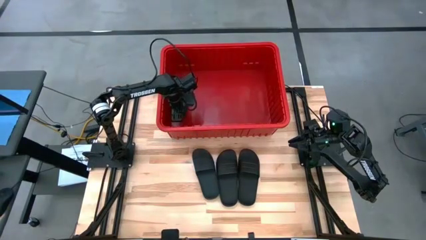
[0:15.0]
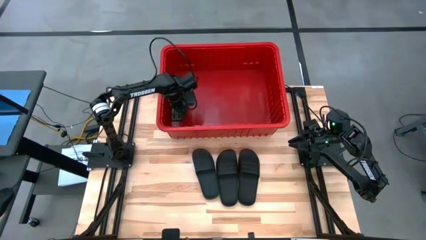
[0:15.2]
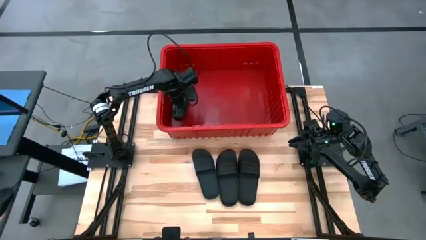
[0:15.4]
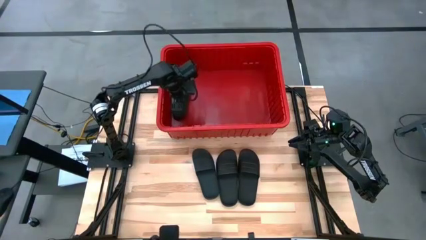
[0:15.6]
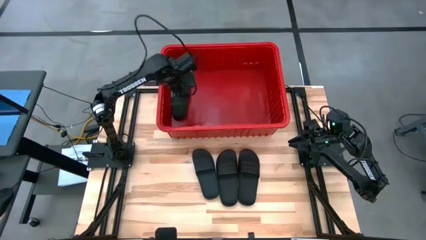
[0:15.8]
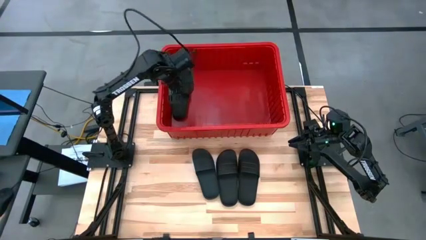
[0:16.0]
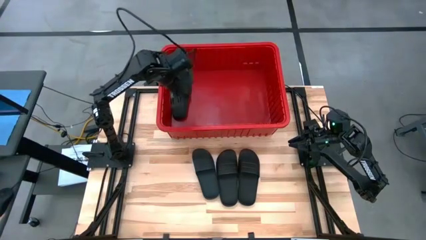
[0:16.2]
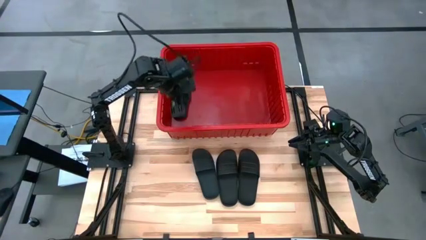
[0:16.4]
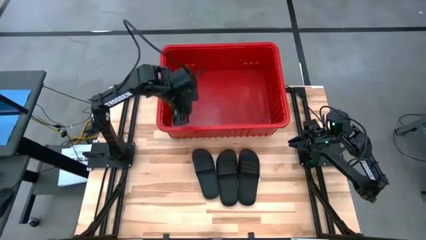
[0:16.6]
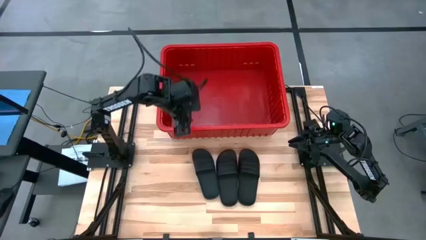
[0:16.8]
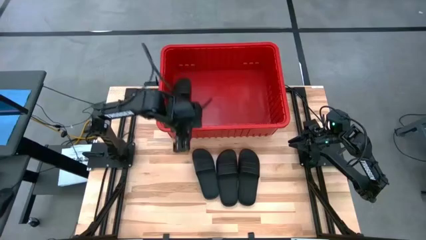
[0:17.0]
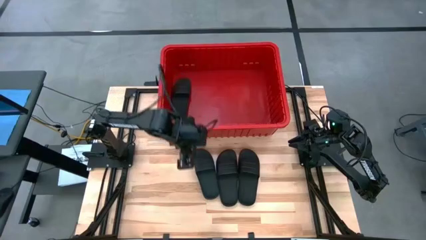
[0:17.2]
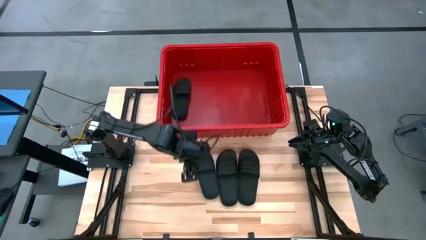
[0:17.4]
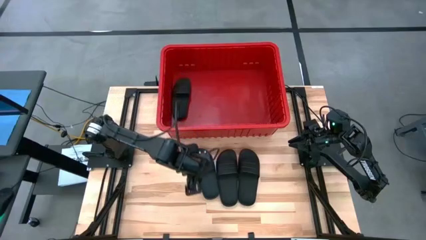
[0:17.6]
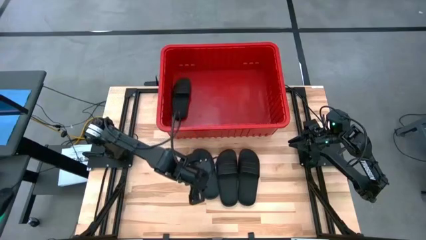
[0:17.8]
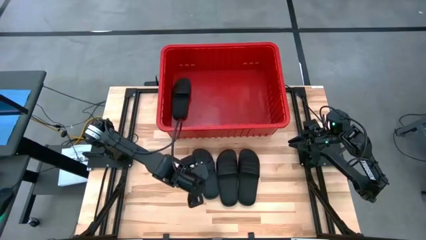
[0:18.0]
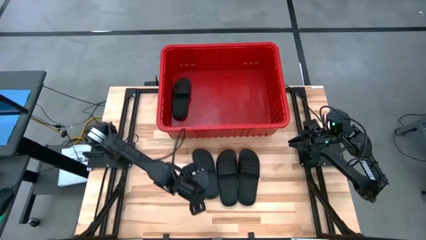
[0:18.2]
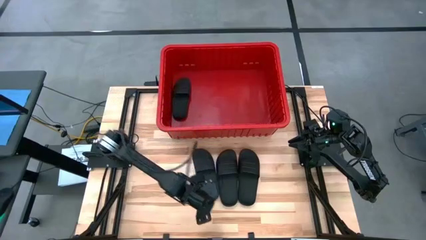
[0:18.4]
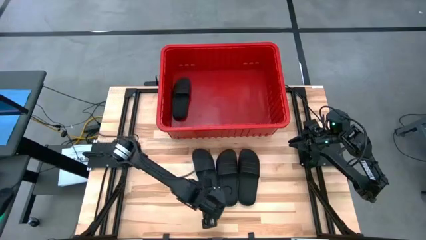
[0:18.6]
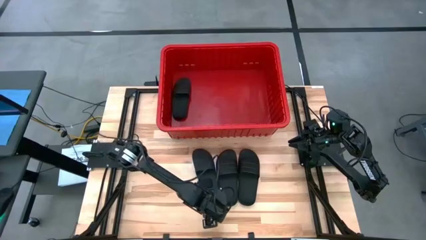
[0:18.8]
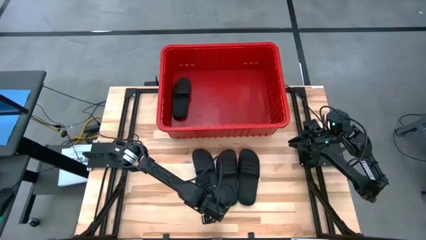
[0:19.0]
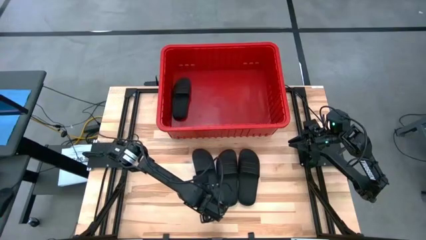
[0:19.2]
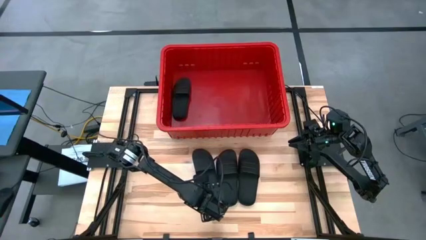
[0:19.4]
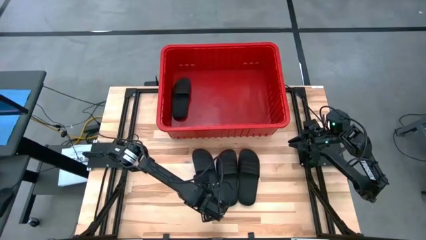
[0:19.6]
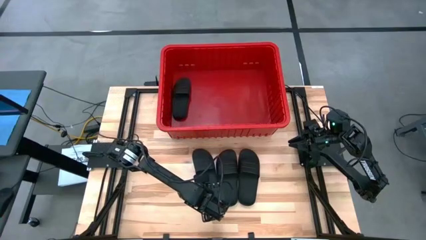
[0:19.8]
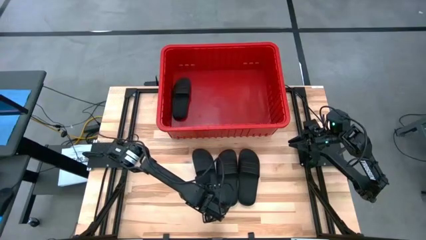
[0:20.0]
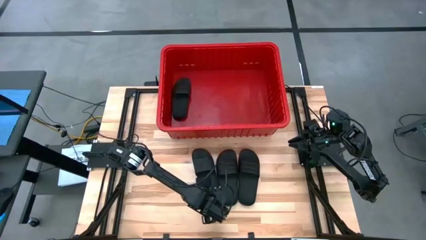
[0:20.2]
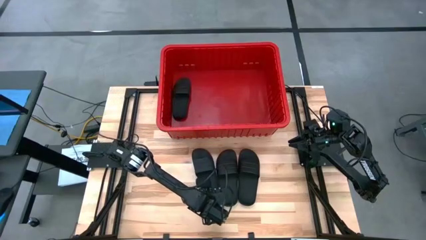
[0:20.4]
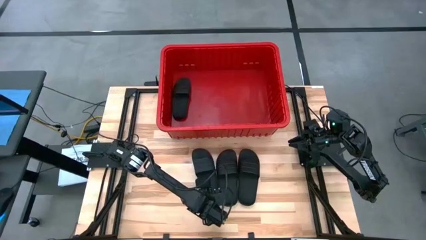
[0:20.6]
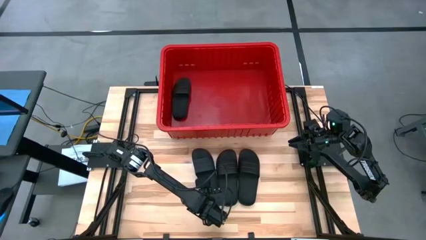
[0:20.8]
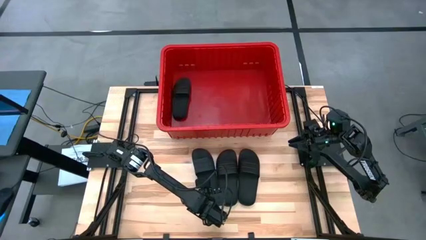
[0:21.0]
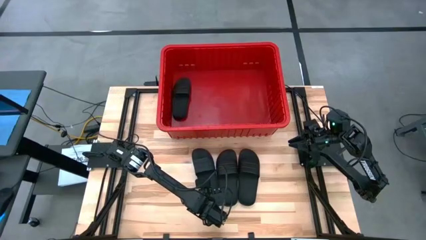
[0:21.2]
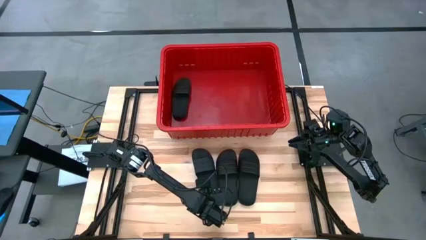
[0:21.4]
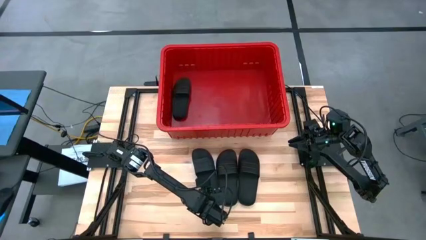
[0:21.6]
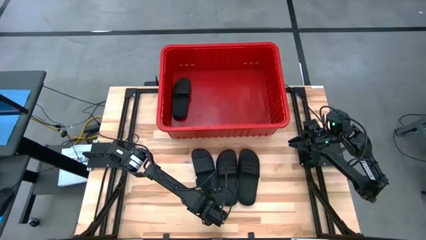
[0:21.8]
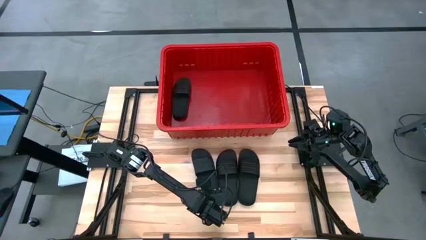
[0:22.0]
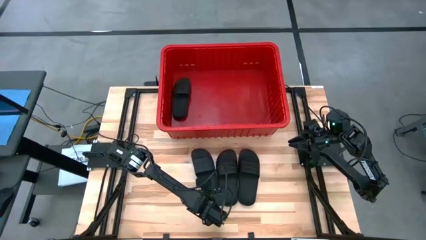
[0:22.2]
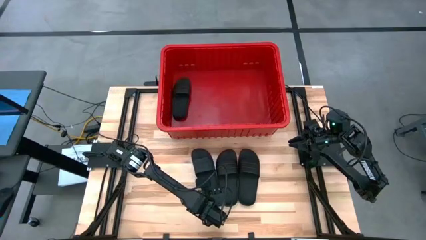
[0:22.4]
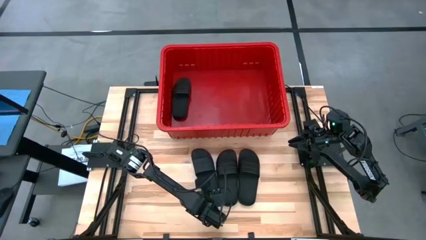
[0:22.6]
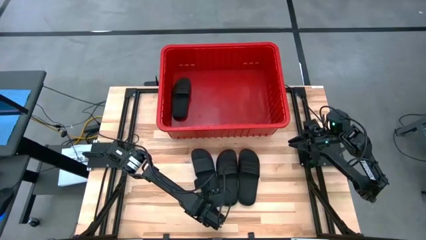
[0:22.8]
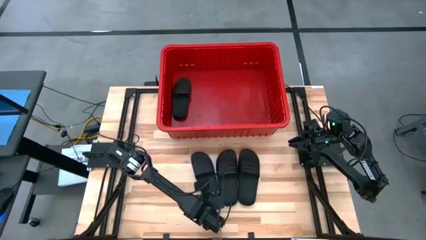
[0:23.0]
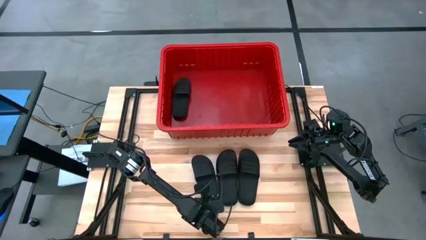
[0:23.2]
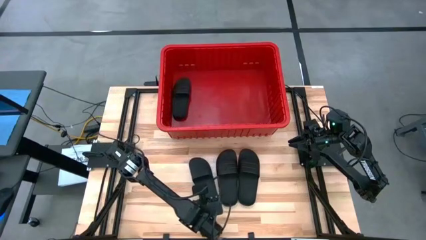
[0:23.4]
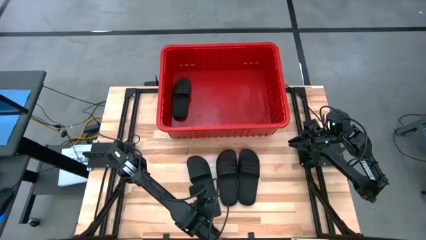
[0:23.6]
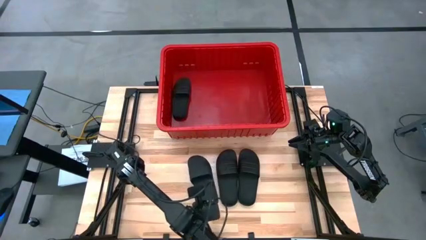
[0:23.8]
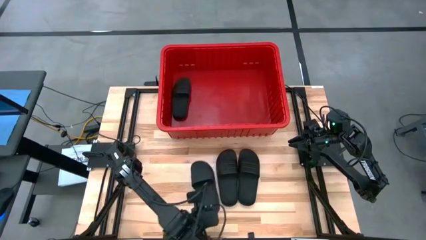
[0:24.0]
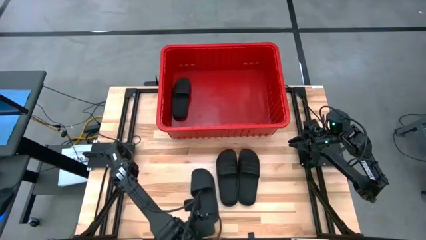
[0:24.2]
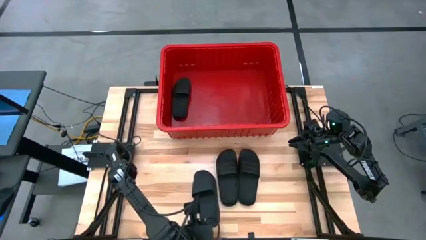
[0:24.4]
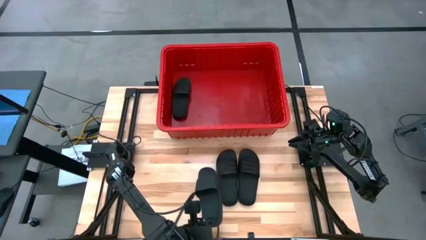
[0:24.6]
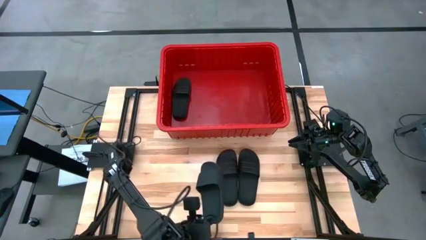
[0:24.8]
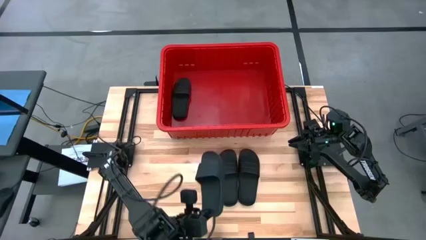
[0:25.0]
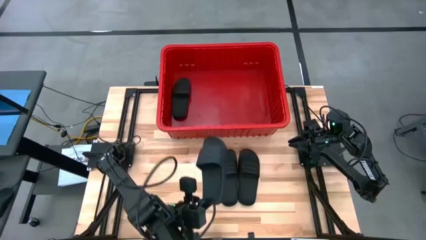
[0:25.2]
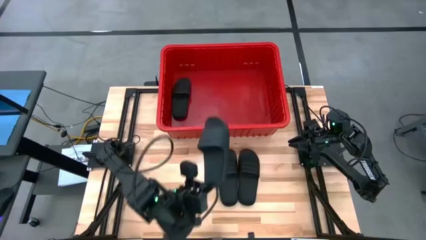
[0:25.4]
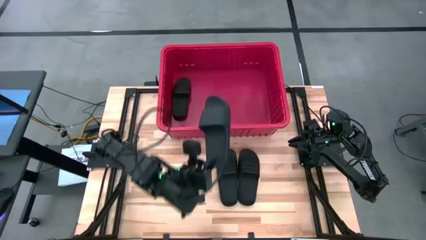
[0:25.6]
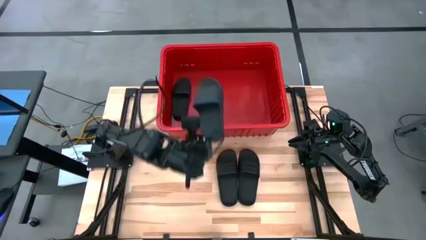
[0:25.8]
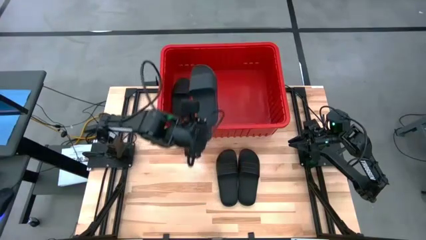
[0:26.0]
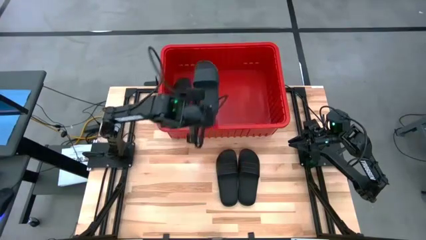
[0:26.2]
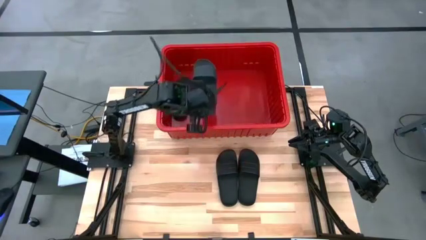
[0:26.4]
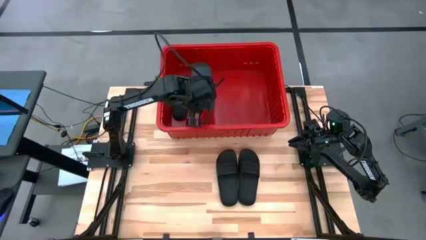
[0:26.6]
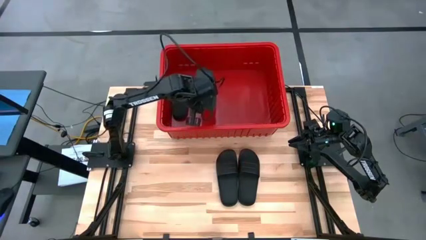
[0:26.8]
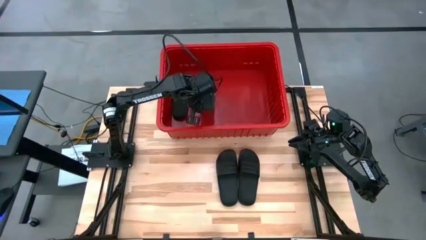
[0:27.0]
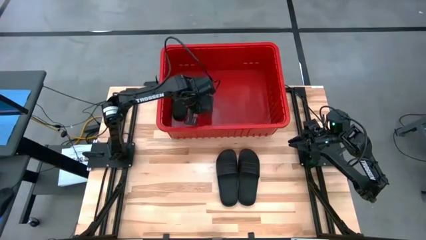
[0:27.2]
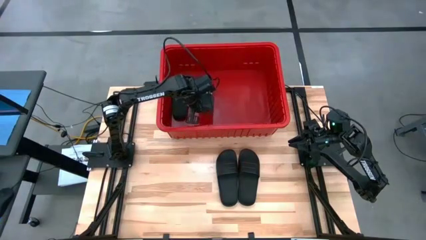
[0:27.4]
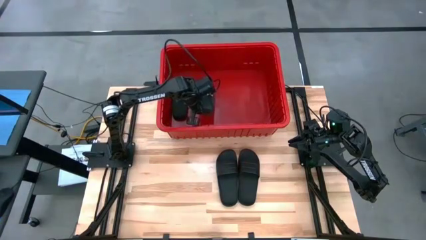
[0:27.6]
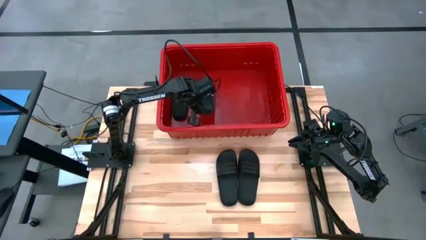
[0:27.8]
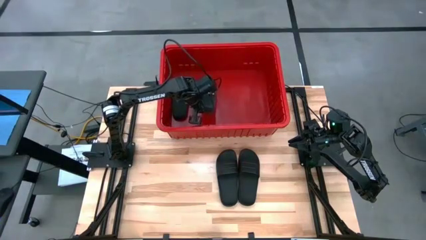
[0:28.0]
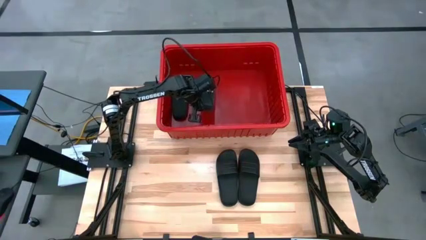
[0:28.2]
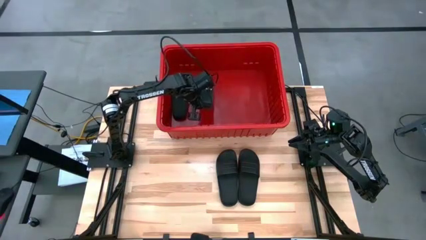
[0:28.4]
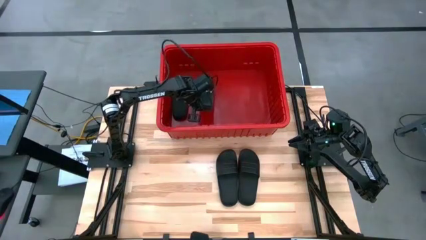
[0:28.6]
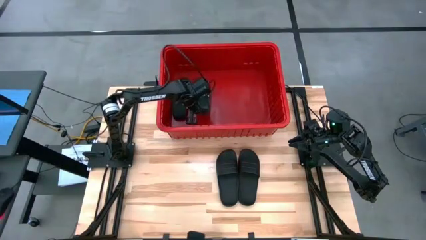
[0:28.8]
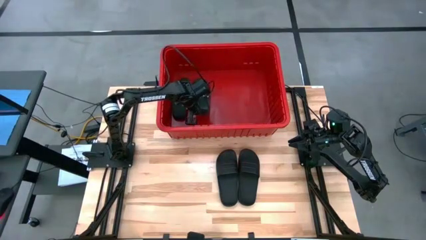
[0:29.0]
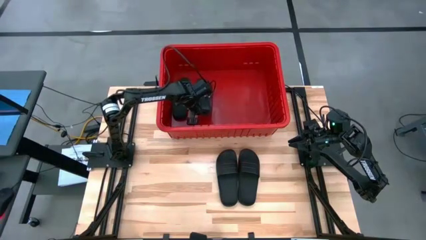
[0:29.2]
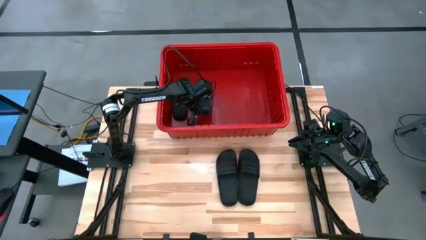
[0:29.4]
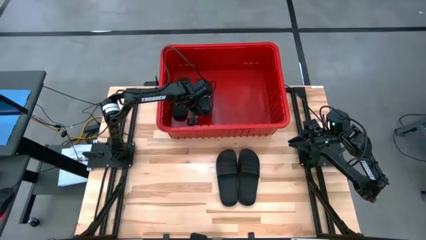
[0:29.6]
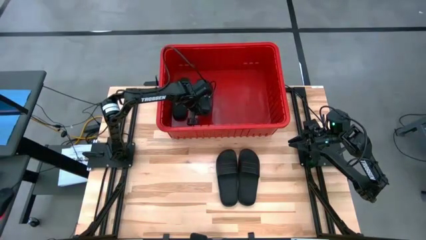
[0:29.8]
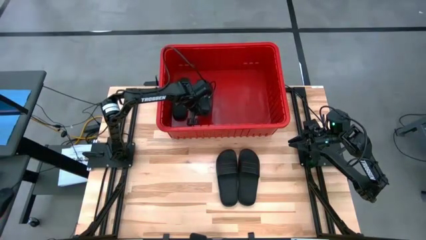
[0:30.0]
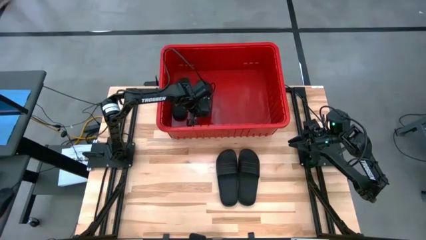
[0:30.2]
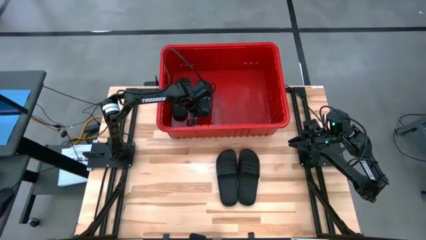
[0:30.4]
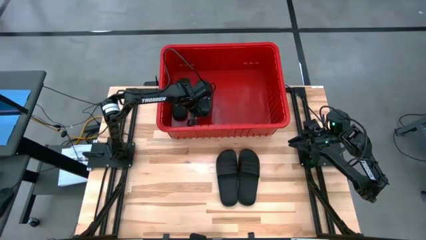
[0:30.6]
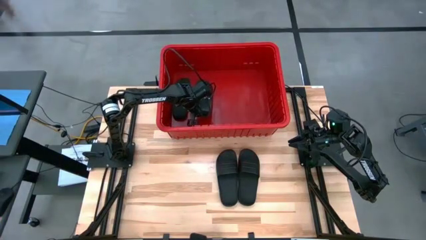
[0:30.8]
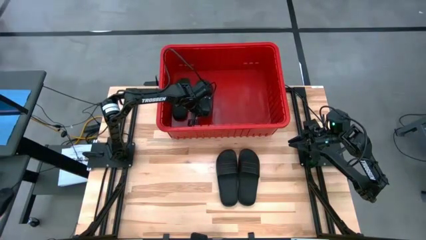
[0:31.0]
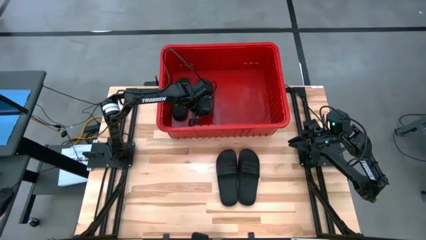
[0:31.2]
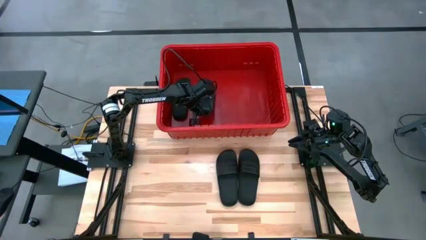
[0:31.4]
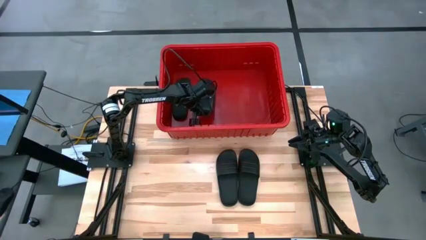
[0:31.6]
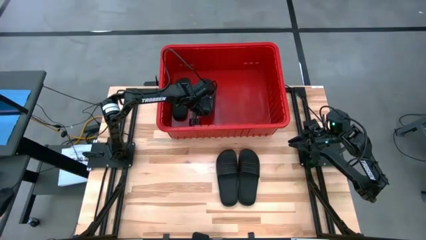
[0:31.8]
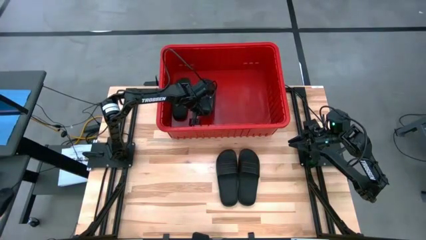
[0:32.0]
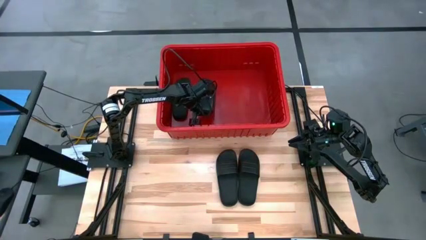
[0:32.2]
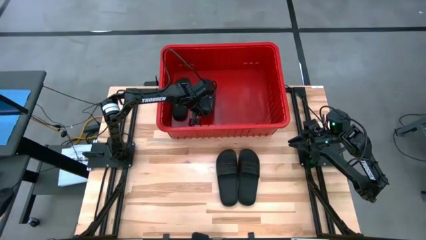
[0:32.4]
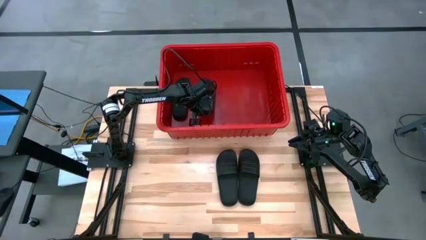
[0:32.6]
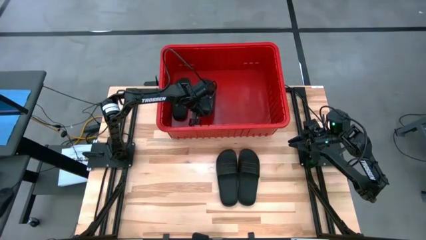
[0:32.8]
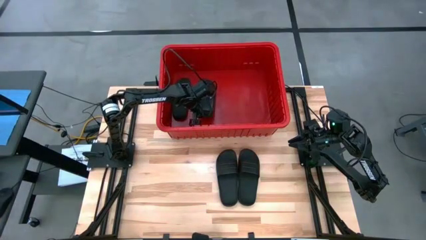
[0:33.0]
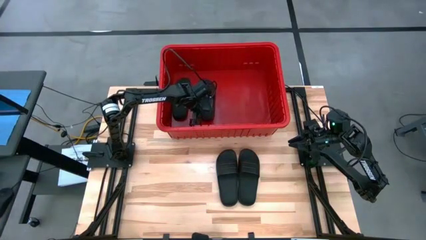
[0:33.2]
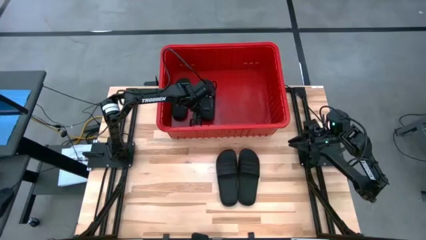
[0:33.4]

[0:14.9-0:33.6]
Task: Pick and place slides into bin
Put the left slide into the bin
